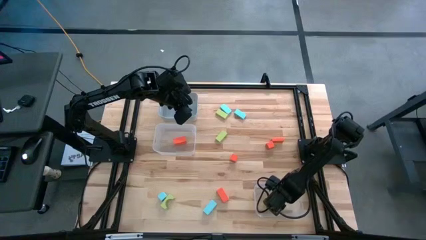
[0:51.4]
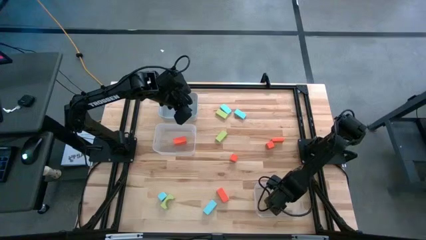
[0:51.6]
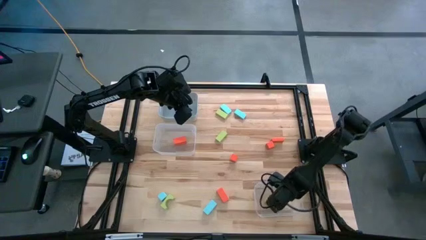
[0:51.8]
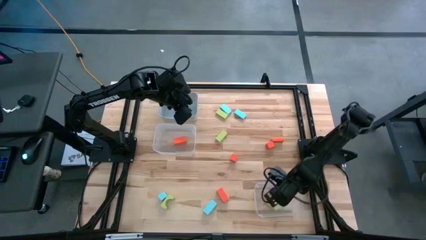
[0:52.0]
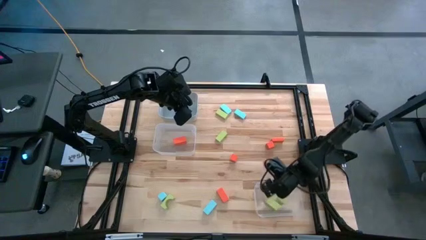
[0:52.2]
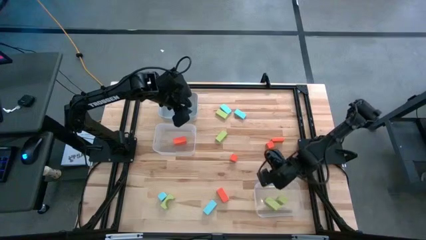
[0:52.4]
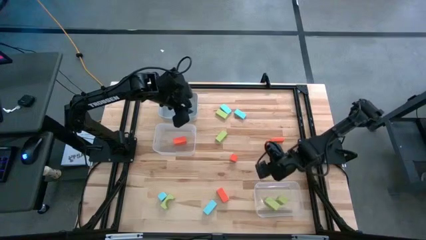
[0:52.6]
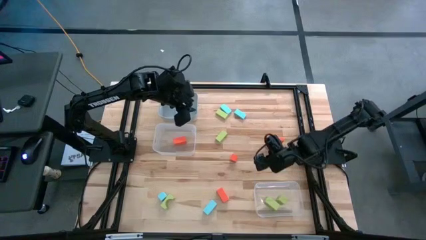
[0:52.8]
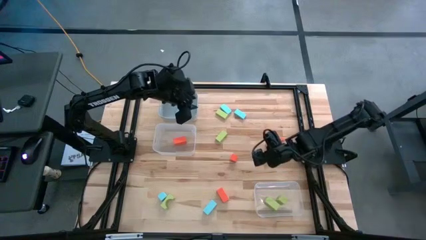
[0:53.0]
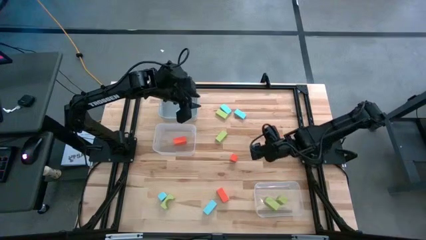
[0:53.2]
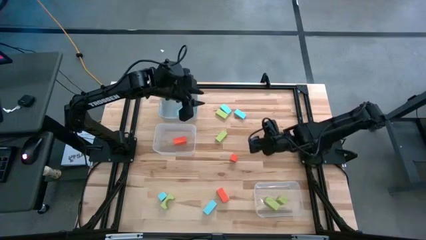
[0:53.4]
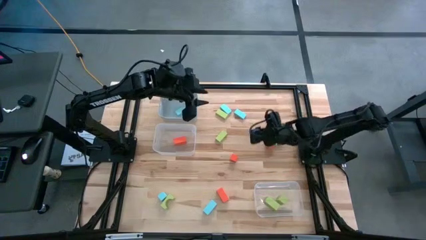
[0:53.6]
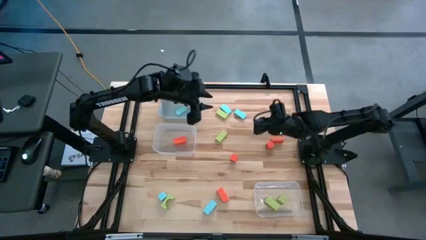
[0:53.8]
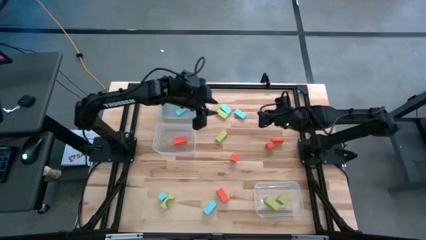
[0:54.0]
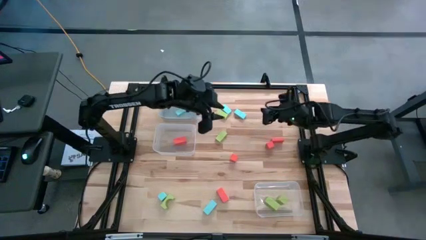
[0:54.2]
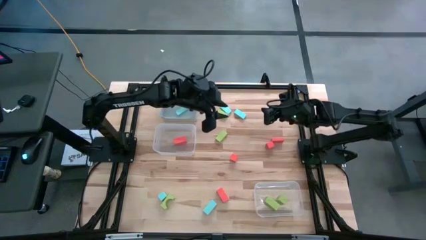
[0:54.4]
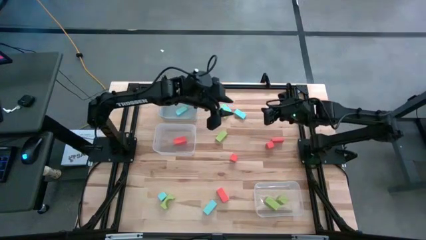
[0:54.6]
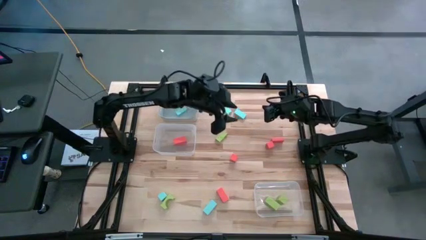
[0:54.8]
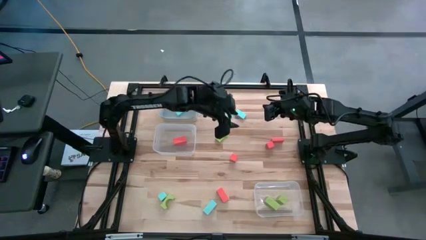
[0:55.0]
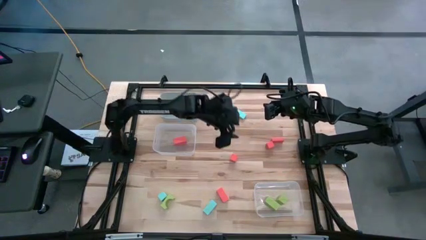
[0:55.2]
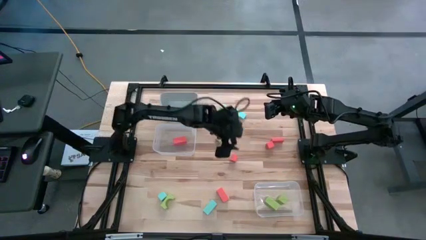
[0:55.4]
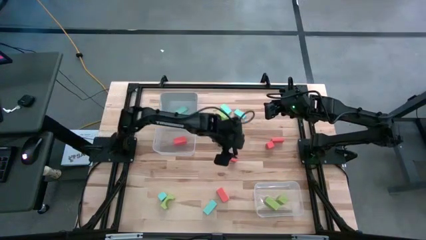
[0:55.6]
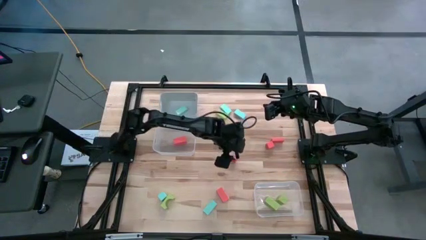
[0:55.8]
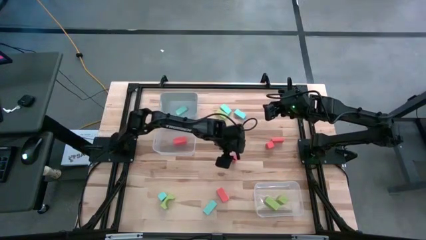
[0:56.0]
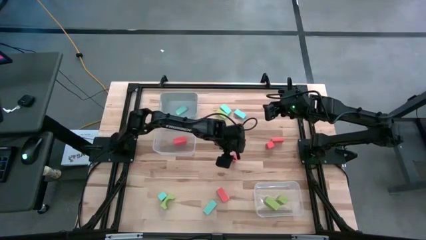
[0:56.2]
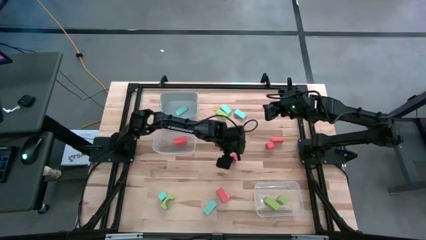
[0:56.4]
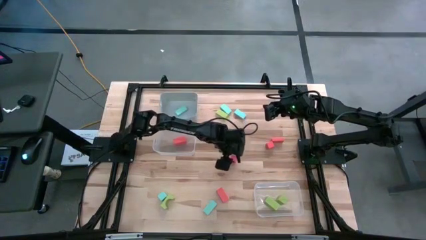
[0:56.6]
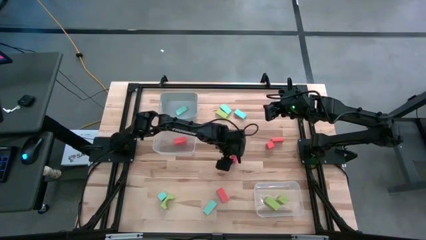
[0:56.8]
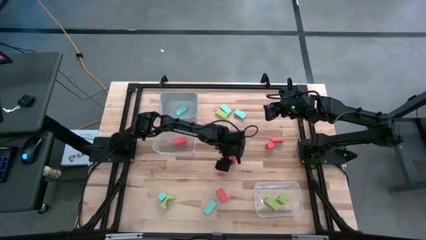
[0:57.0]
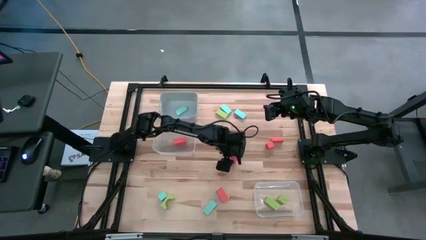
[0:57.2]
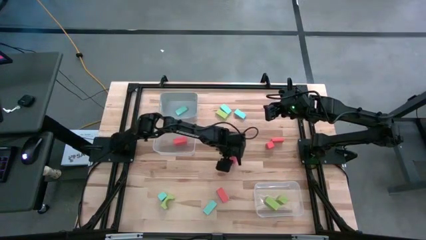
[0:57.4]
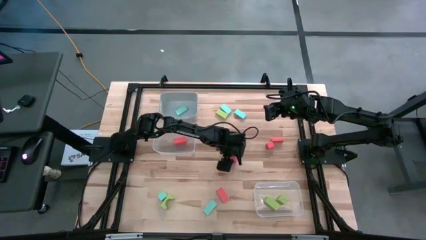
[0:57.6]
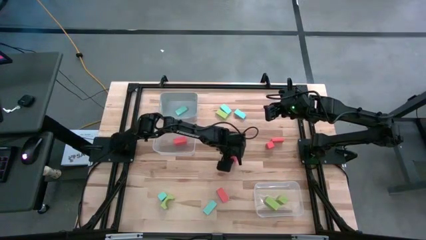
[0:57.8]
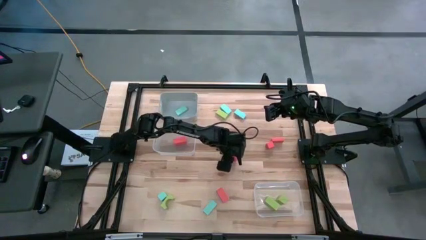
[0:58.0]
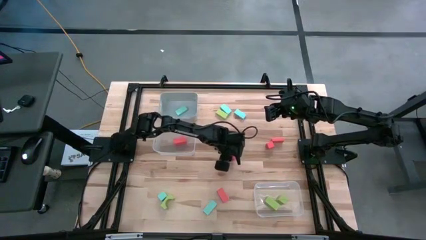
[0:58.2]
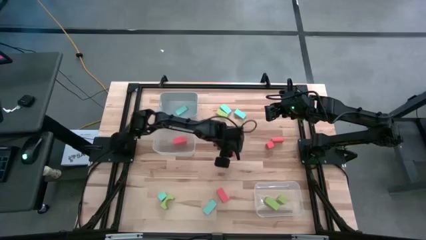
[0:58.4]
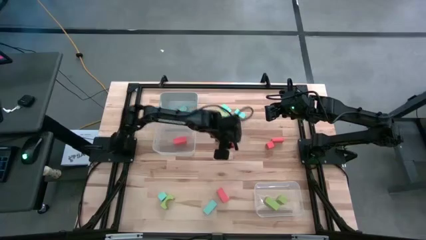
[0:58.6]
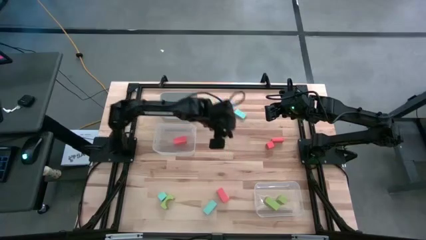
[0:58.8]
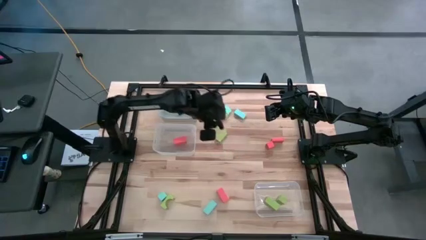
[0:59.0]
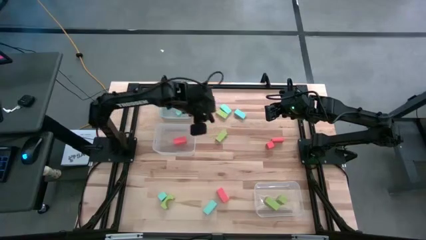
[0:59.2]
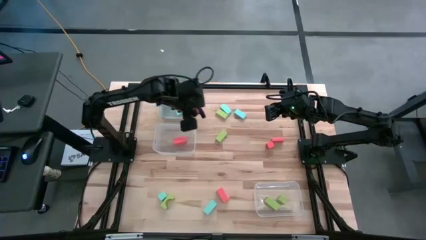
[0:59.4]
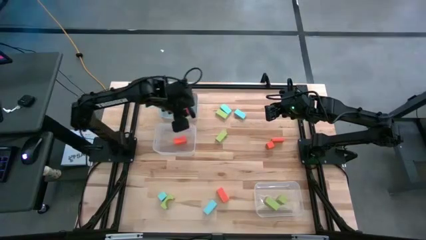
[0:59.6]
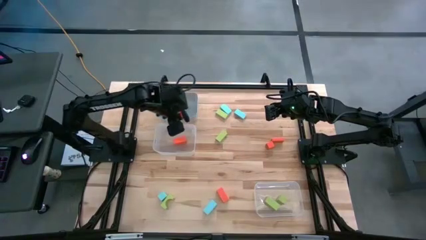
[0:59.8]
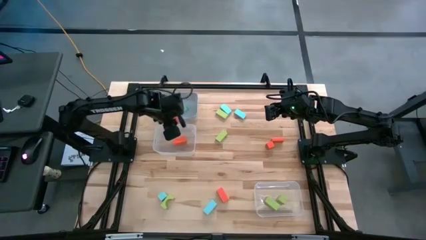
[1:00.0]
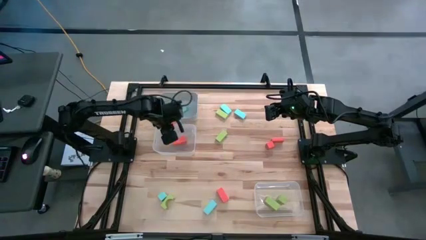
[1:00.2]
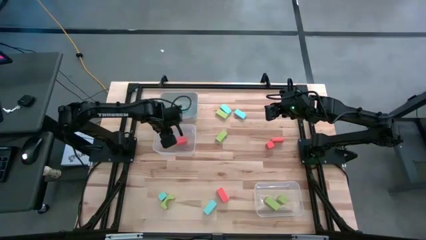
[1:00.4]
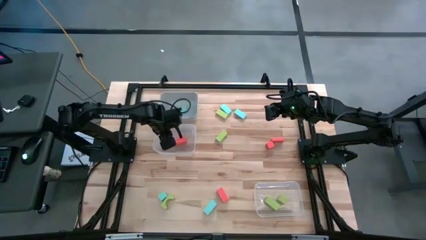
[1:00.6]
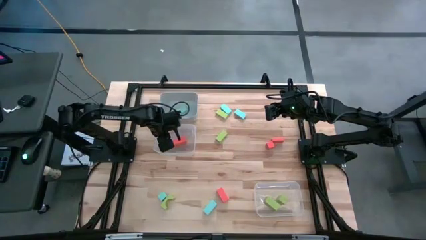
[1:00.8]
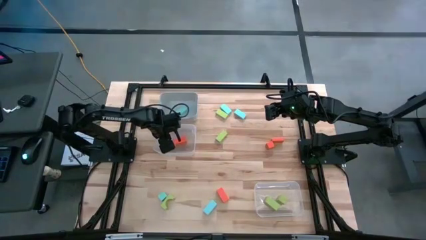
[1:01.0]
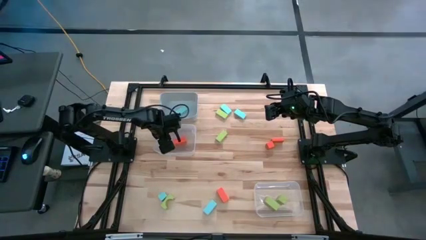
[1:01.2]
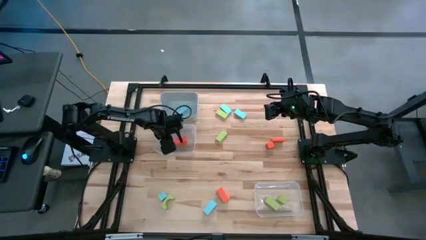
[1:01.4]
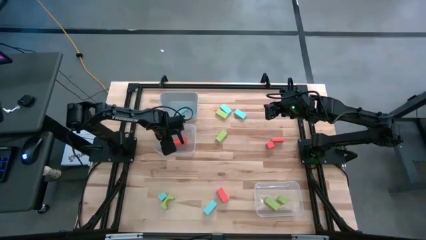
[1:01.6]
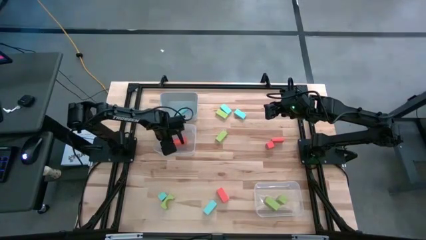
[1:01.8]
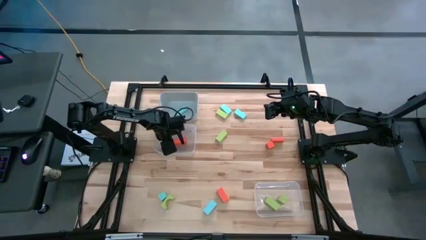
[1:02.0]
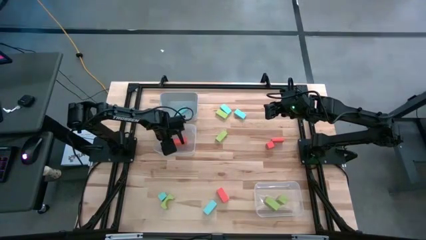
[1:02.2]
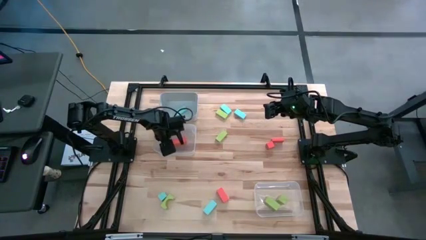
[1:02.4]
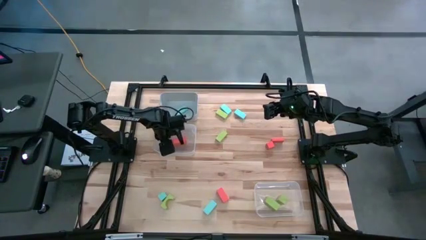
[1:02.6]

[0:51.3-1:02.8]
Task: Sort & place blocks by color
Put the orange block into the top transparent bin

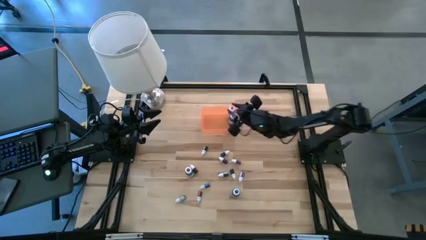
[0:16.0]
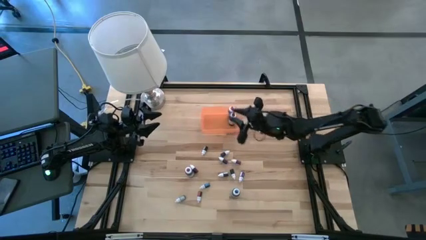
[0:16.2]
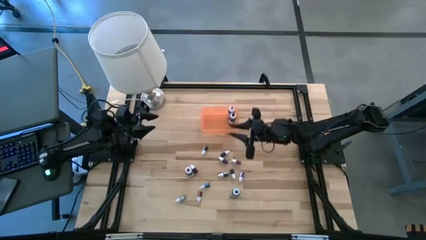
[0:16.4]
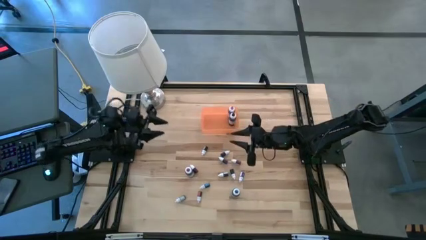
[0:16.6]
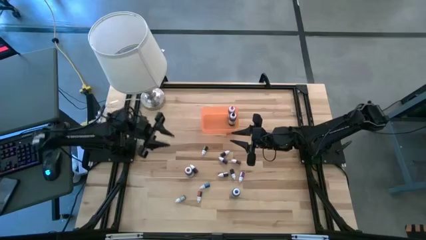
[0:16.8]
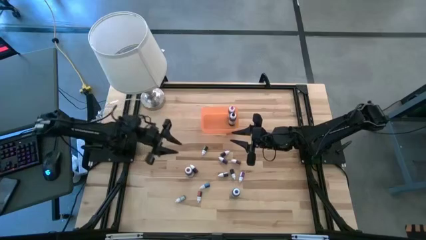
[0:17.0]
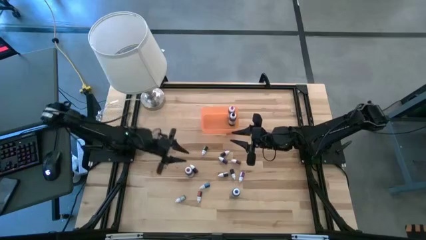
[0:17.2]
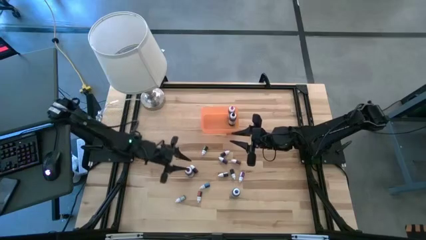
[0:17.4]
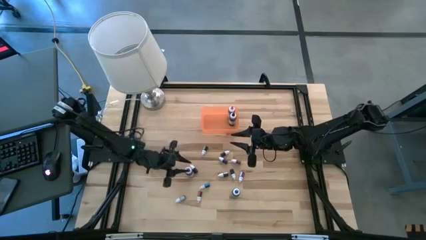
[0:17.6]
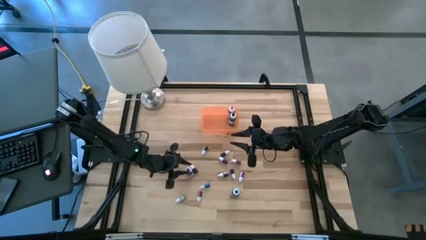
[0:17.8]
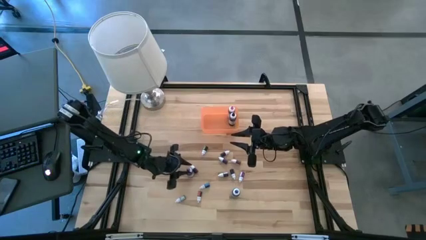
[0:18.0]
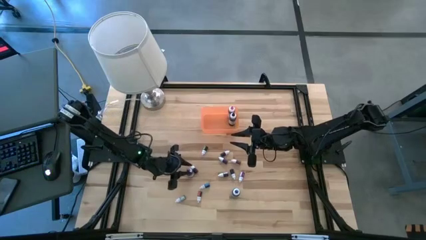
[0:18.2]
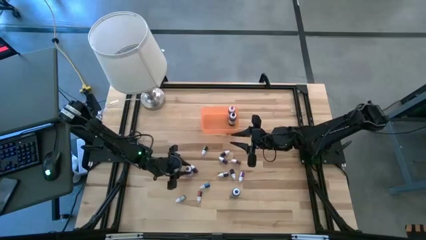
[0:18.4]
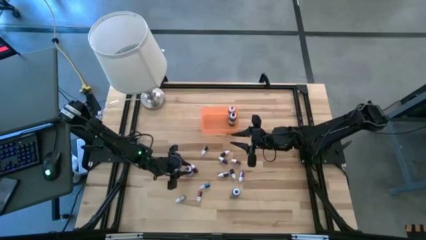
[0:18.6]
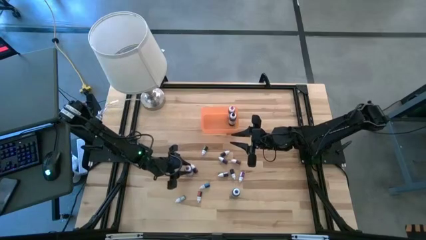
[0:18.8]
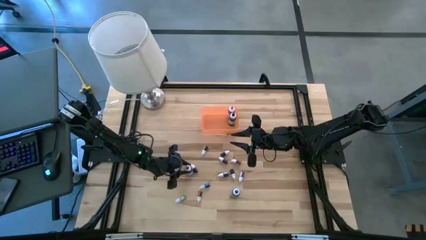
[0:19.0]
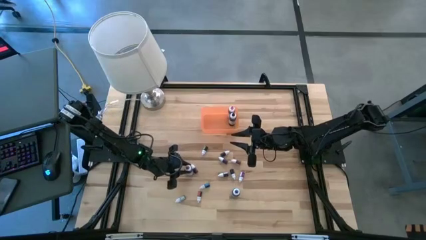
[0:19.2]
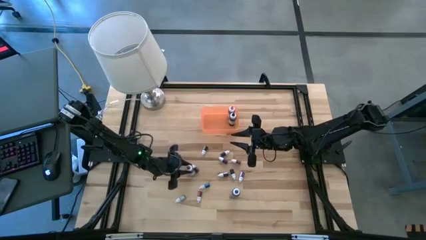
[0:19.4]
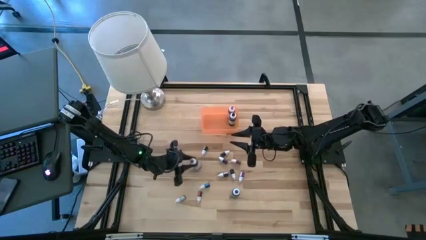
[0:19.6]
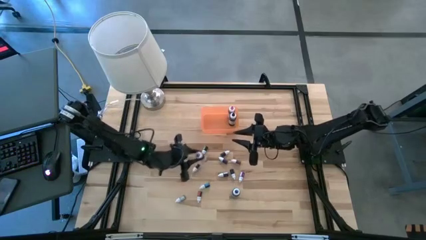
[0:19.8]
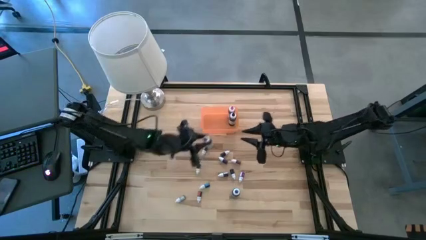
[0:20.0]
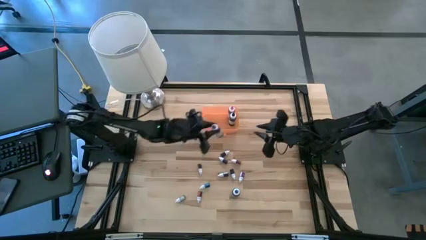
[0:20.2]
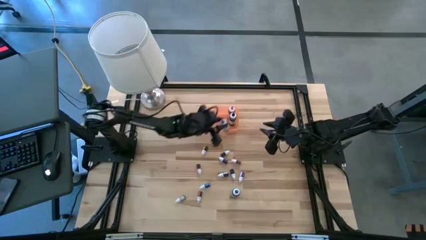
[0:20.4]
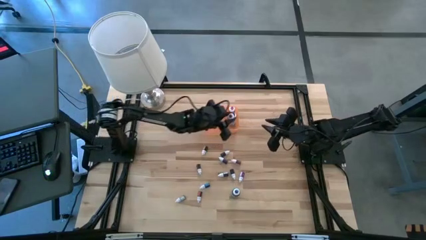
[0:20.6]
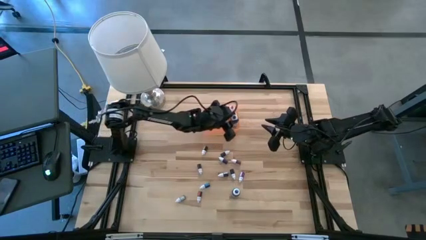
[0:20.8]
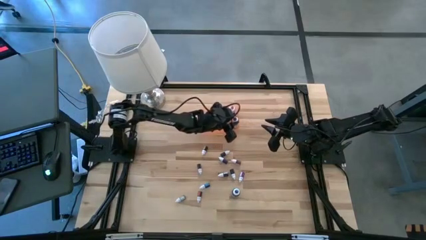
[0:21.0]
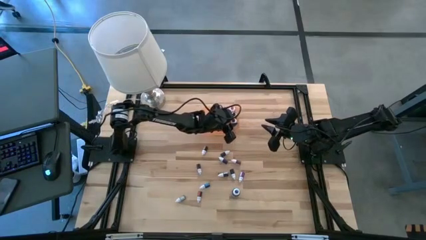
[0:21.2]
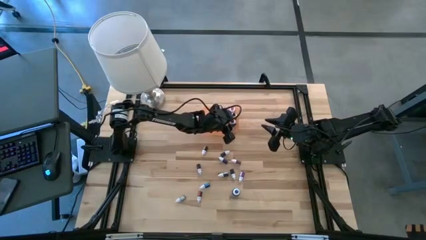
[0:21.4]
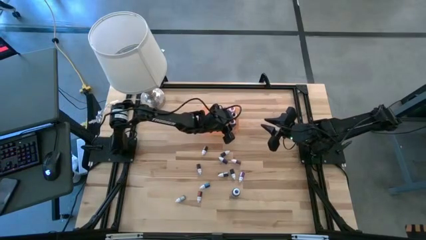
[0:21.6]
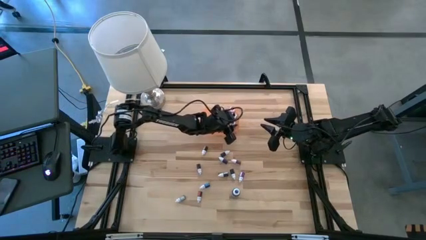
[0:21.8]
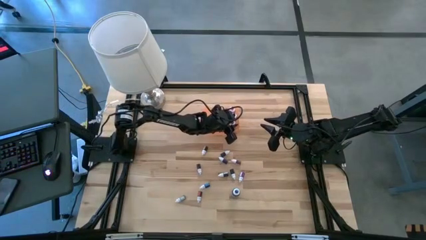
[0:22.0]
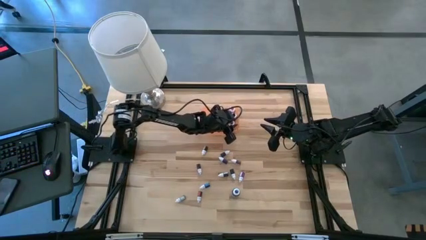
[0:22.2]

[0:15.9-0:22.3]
Task: Pick & Place food coloring
Put the large violet food coloring bottle into the bin
